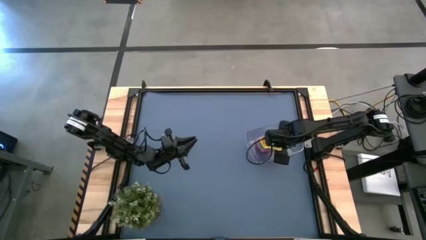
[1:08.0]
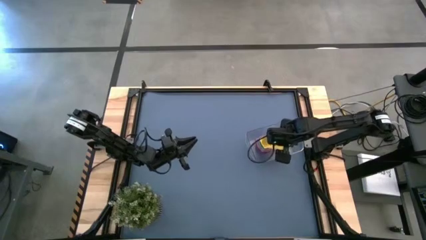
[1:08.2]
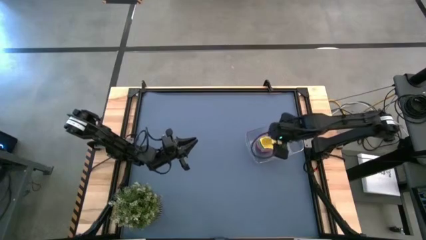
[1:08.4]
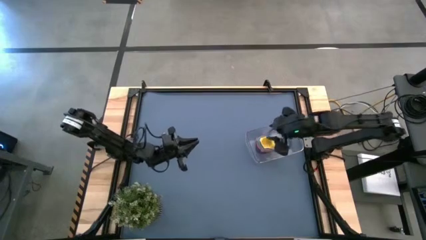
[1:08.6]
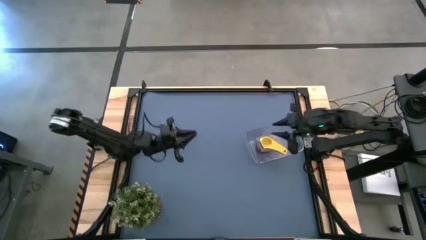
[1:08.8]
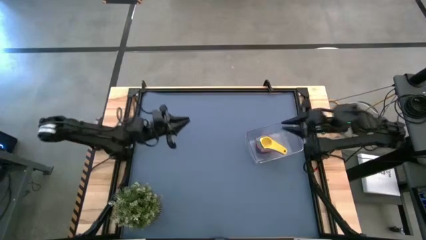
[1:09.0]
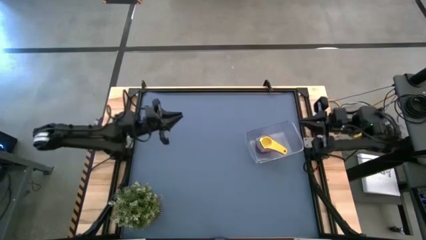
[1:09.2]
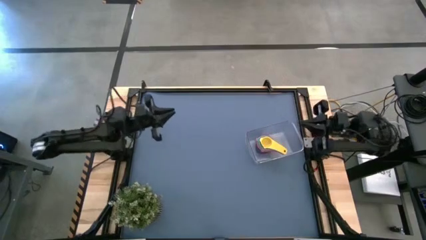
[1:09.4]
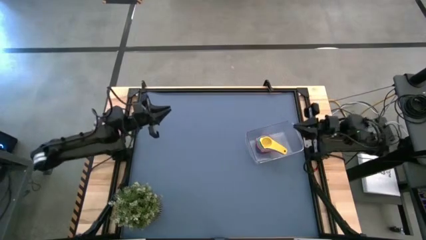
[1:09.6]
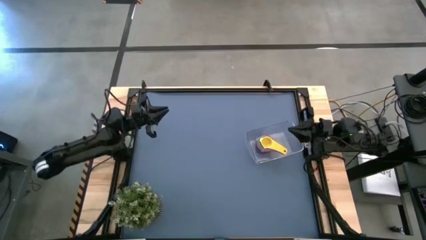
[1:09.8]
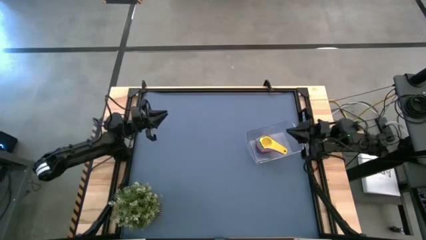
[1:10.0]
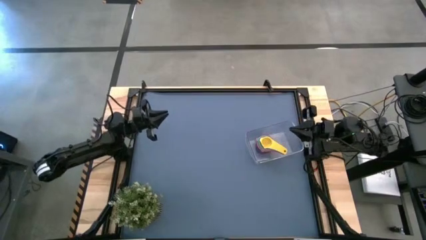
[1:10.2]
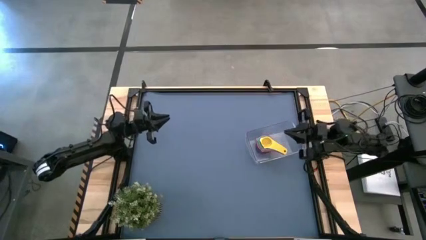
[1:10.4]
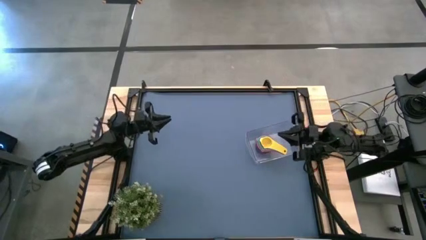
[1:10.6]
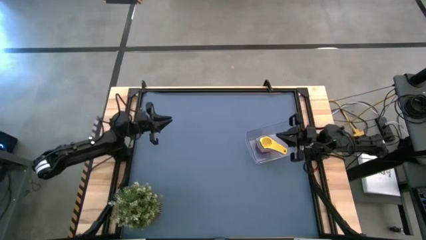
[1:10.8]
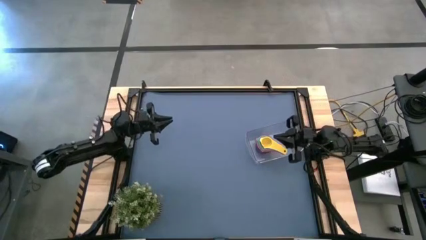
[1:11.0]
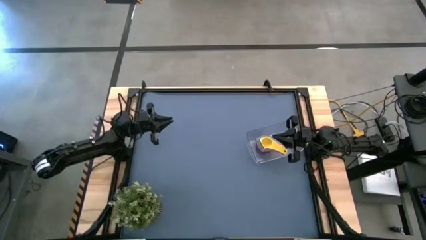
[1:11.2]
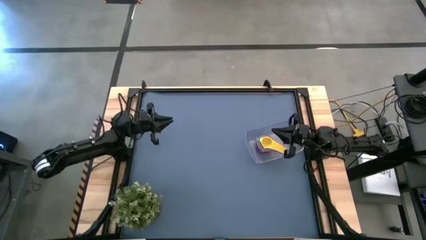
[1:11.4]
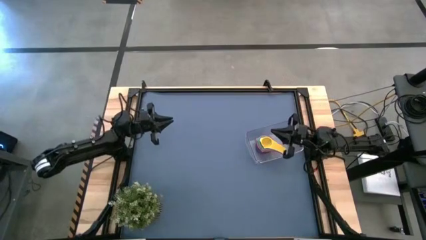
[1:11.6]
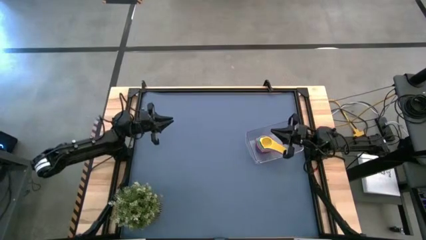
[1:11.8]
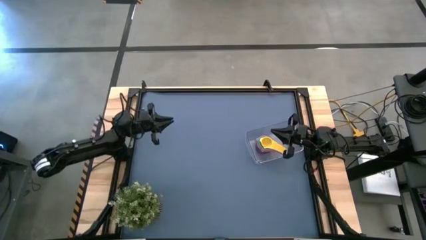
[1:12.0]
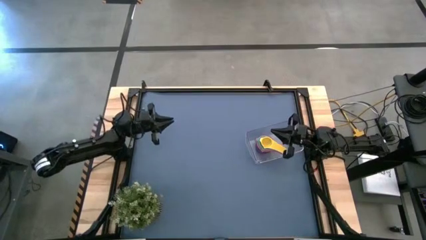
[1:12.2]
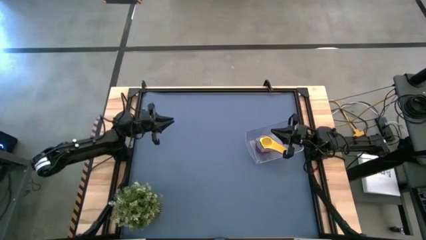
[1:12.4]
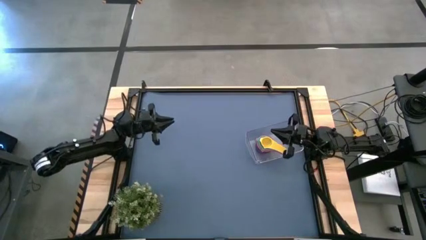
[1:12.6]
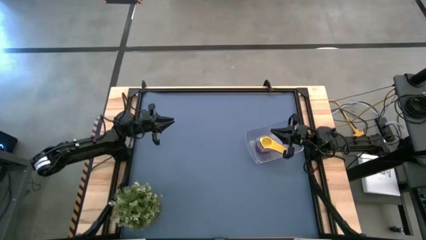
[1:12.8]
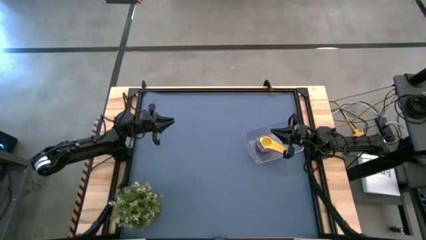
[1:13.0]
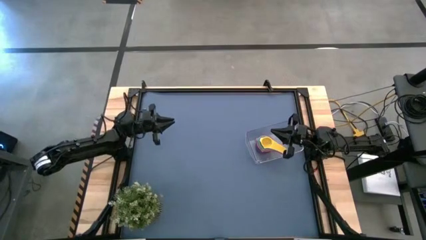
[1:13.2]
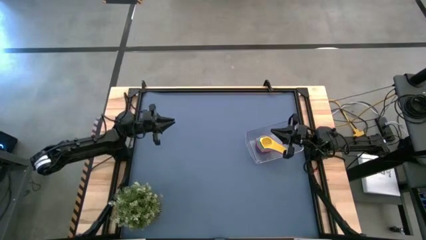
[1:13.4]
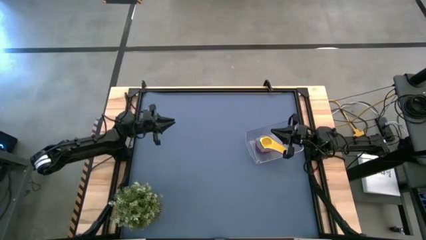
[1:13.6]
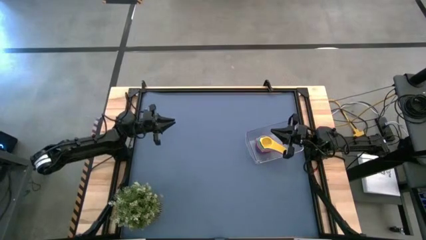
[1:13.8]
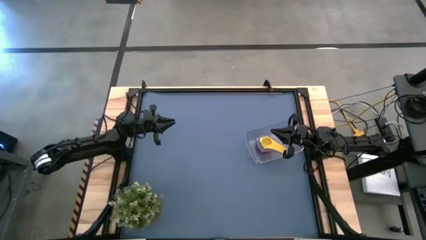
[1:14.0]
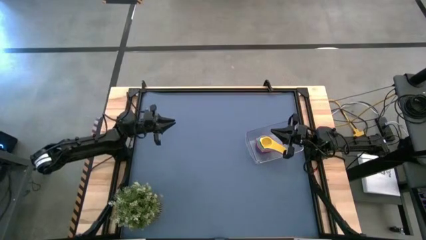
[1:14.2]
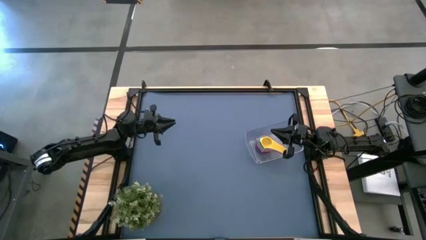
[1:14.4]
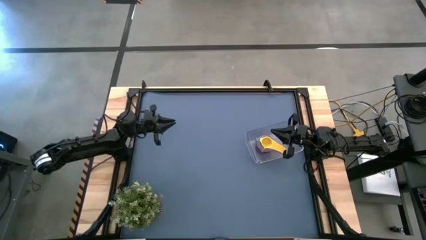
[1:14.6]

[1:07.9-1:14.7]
Task: Nest measuring cups in basket
Return to Home Position

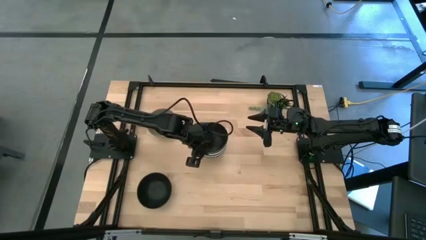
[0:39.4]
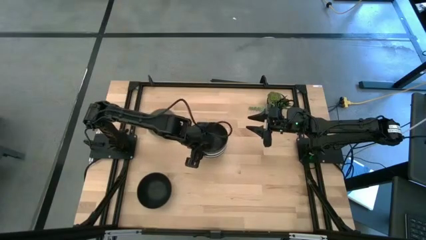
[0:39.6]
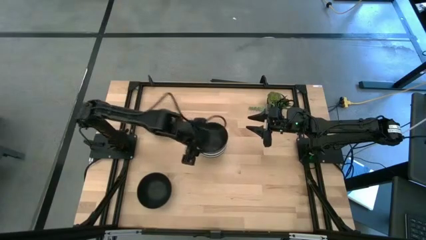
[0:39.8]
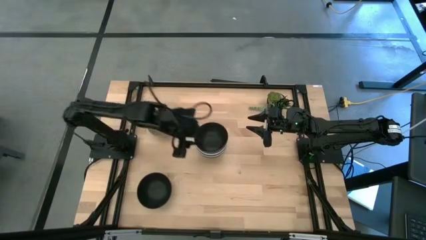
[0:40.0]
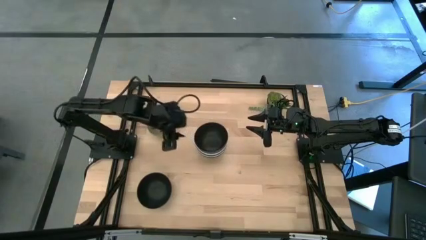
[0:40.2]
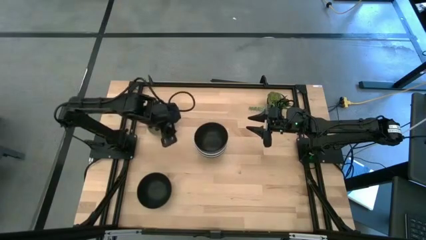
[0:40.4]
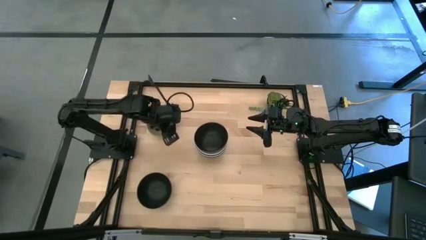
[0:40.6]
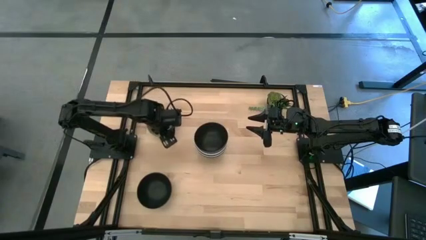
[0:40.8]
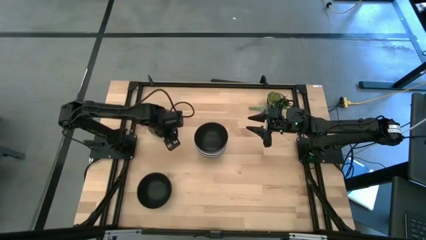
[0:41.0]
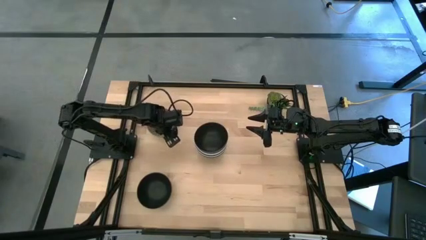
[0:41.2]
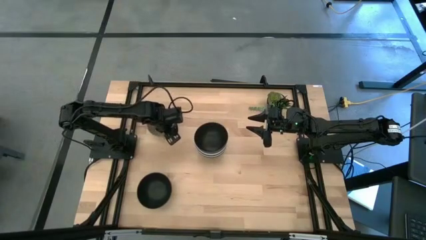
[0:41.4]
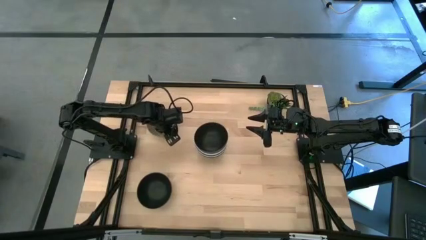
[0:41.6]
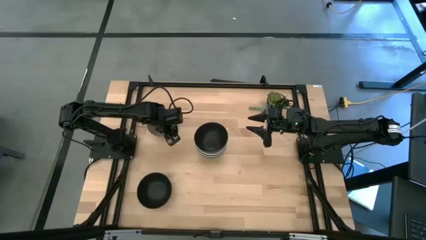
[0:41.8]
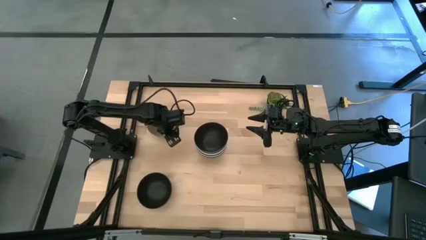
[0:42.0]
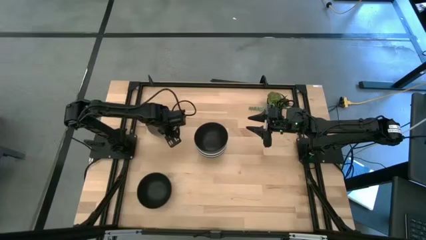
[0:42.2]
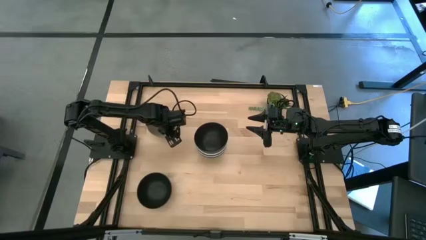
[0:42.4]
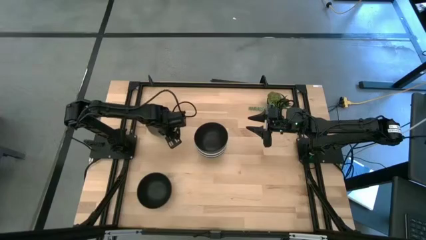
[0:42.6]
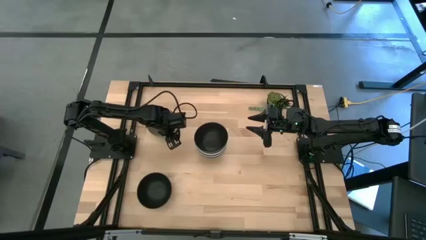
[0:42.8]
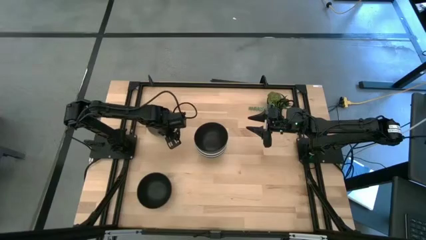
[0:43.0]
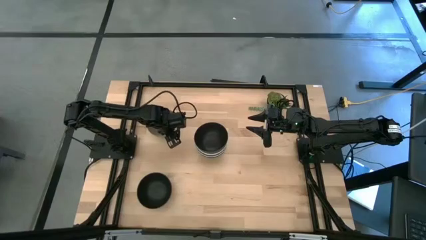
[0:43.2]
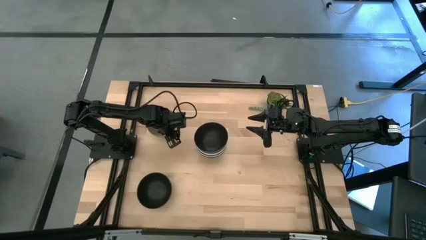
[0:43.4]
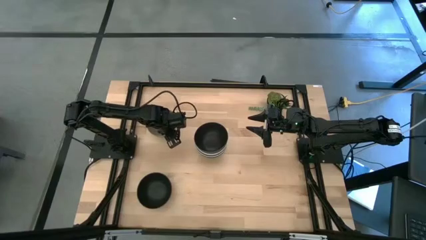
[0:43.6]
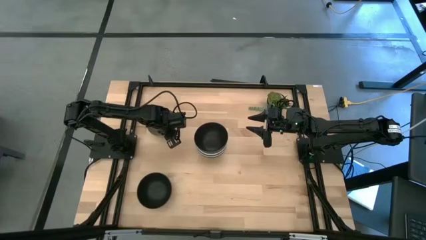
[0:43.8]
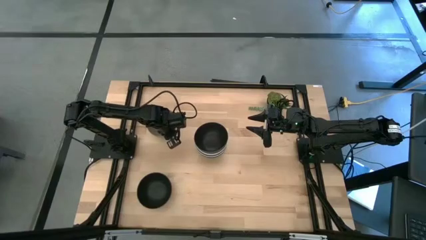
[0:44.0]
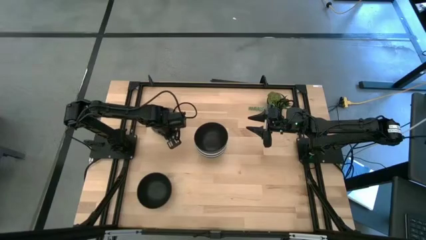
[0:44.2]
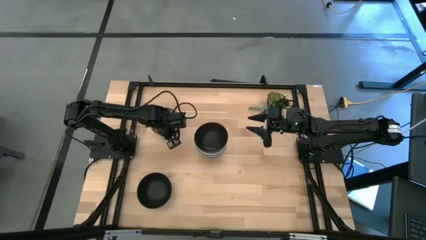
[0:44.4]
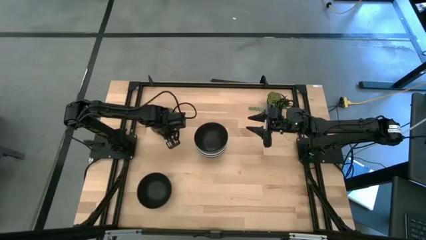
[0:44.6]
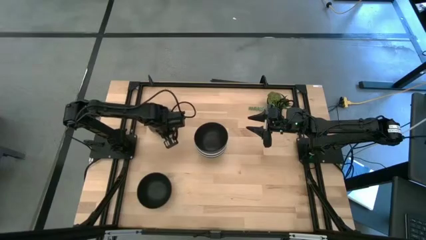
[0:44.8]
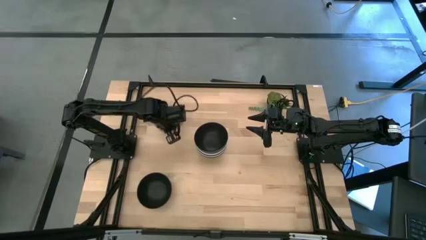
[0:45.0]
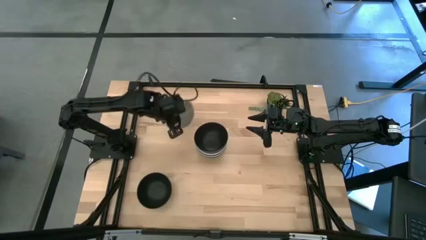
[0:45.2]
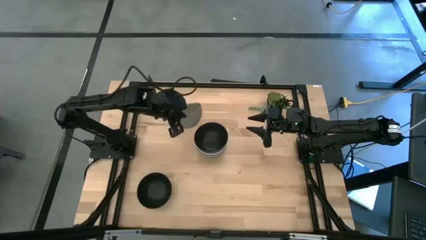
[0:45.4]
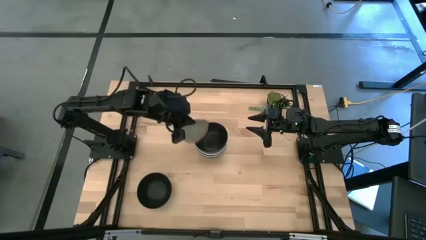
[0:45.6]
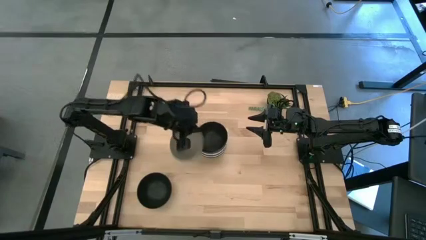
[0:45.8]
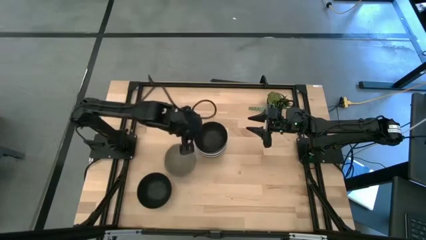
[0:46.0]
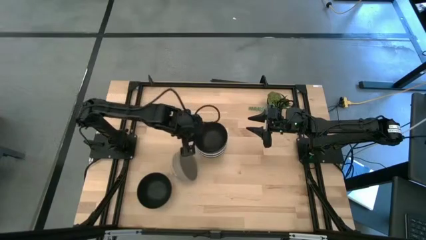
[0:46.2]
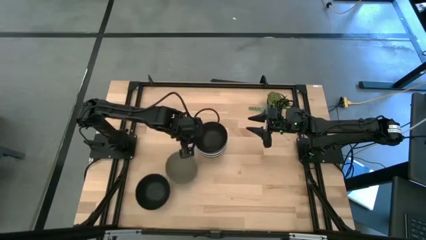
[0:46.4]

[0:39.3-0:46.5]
Task: Nest bowls inside each other
Stack the gray bowl on top of the black bowl
